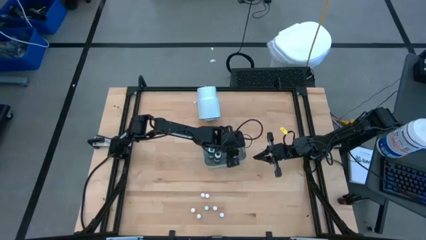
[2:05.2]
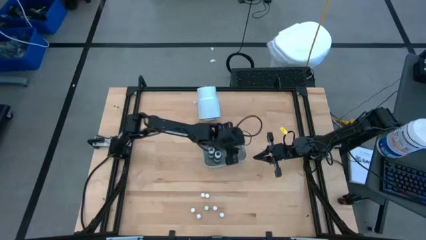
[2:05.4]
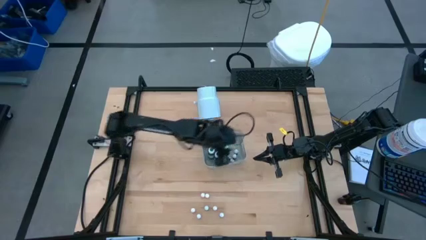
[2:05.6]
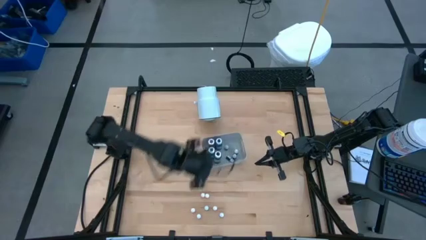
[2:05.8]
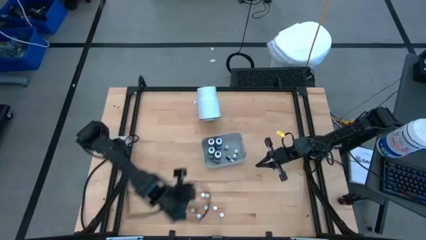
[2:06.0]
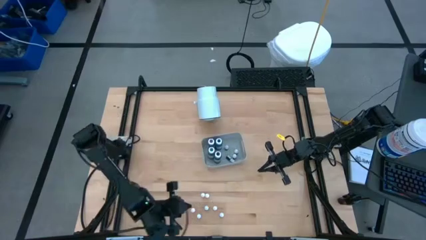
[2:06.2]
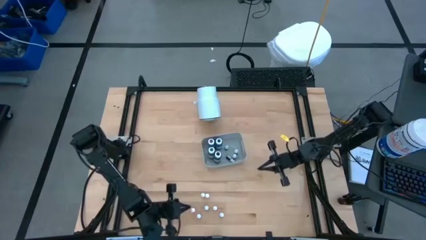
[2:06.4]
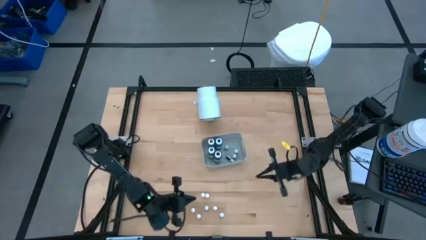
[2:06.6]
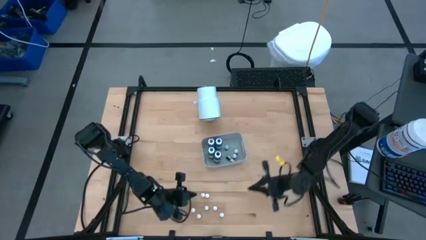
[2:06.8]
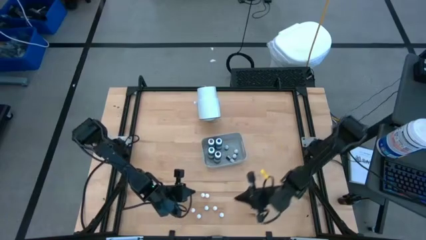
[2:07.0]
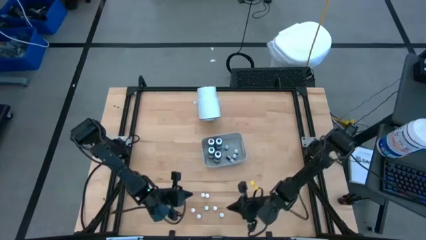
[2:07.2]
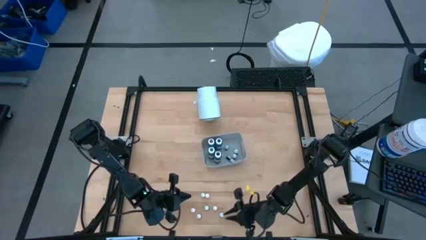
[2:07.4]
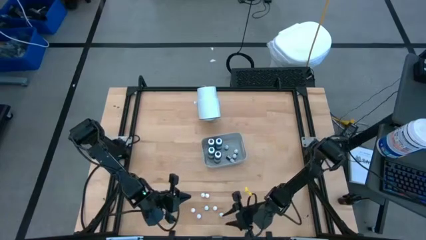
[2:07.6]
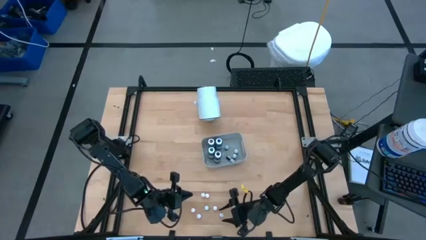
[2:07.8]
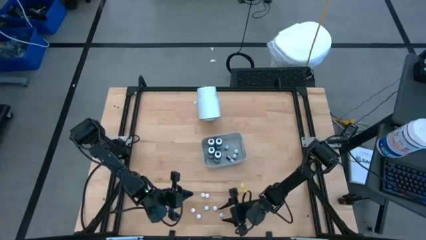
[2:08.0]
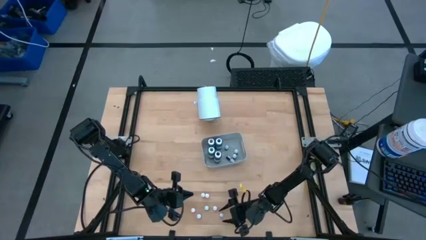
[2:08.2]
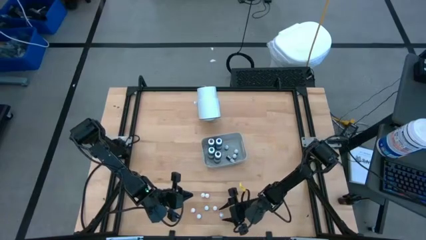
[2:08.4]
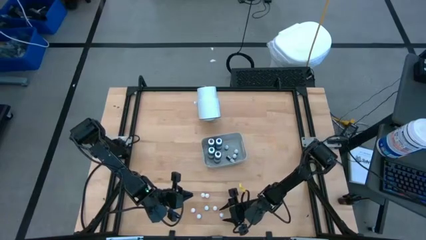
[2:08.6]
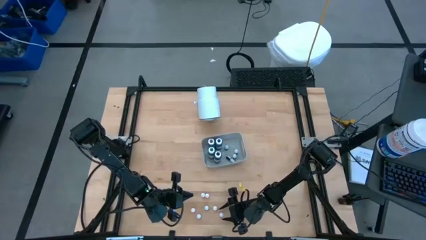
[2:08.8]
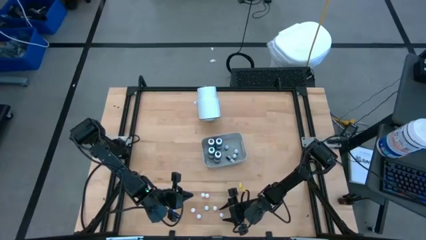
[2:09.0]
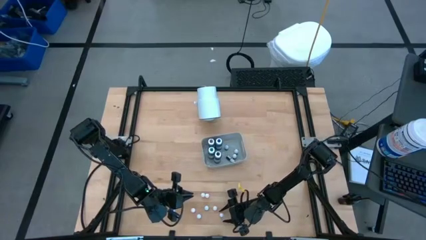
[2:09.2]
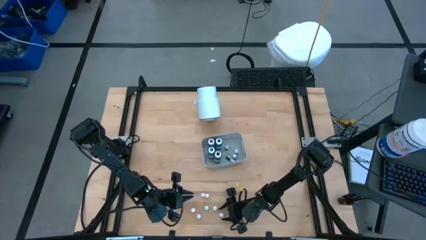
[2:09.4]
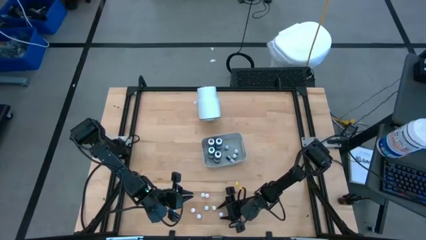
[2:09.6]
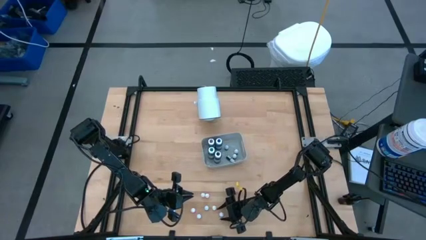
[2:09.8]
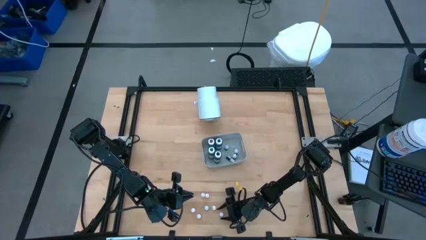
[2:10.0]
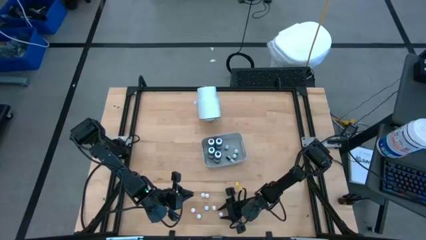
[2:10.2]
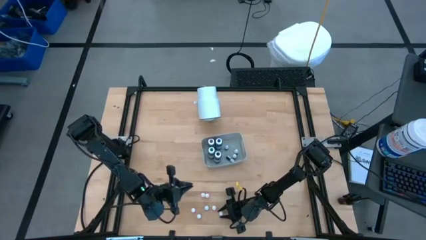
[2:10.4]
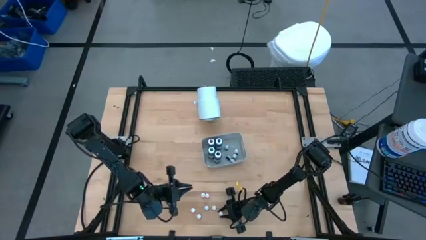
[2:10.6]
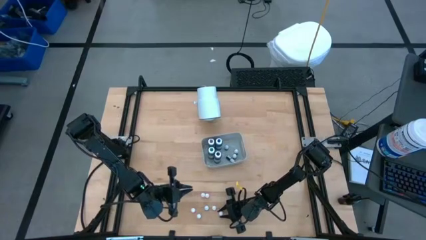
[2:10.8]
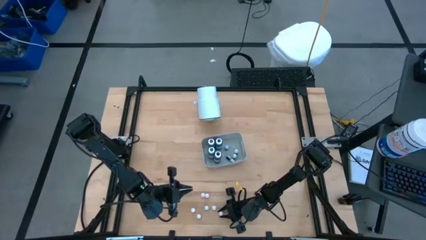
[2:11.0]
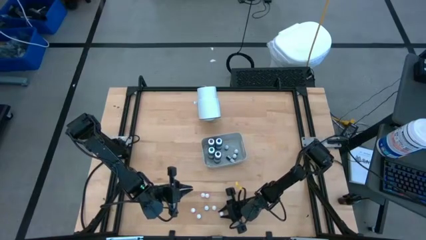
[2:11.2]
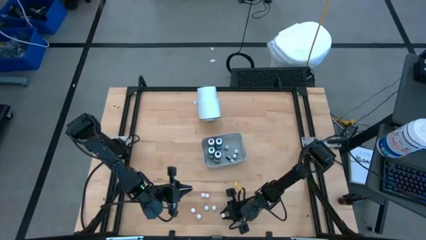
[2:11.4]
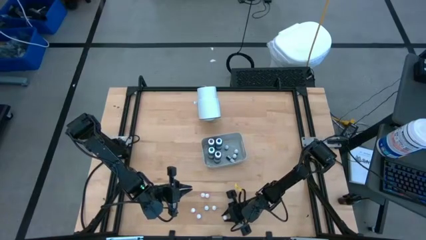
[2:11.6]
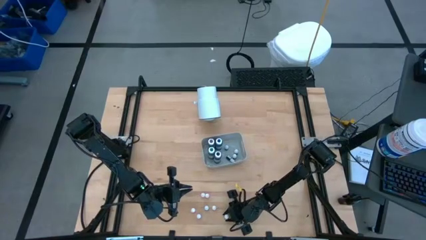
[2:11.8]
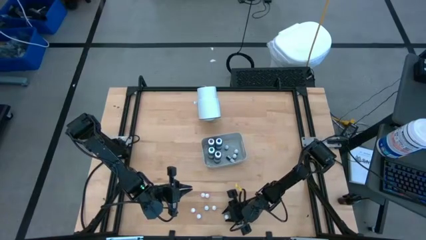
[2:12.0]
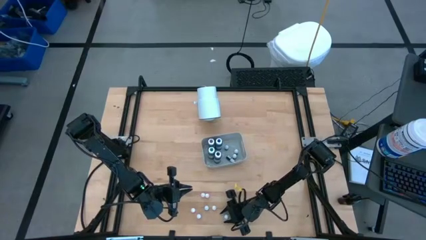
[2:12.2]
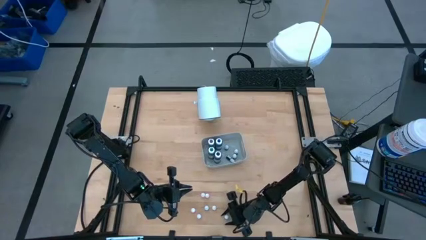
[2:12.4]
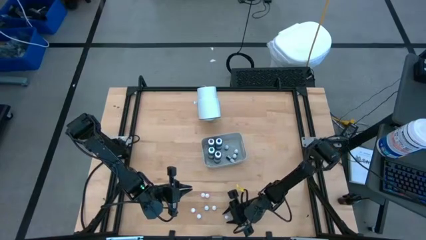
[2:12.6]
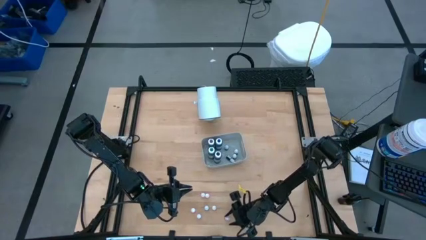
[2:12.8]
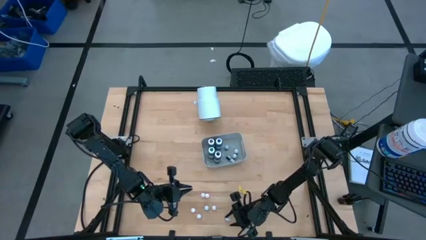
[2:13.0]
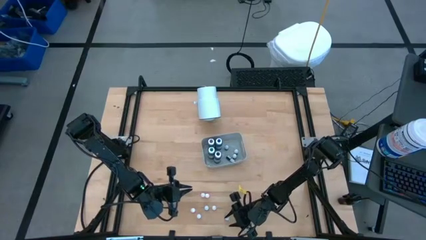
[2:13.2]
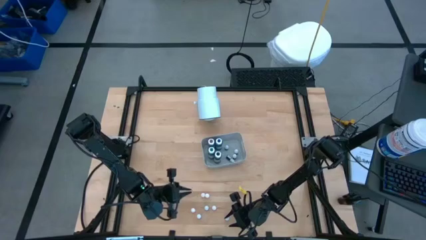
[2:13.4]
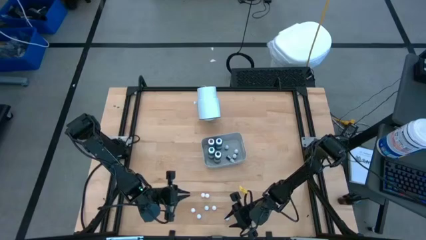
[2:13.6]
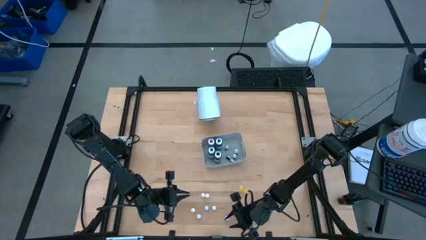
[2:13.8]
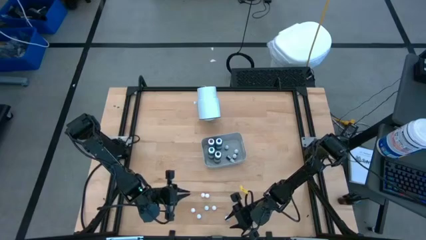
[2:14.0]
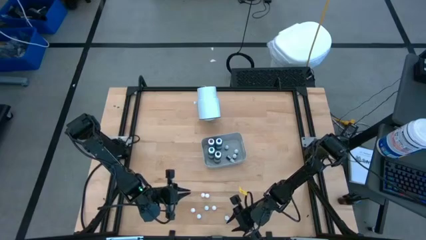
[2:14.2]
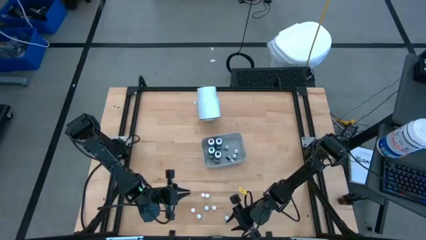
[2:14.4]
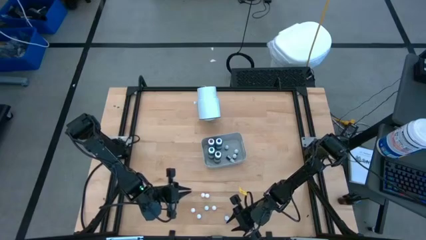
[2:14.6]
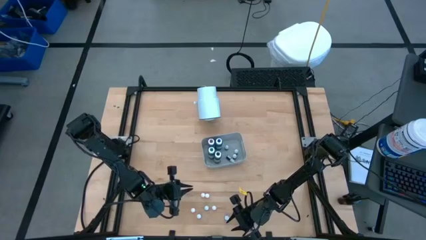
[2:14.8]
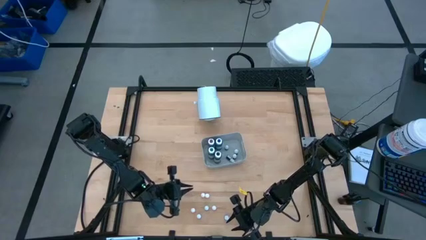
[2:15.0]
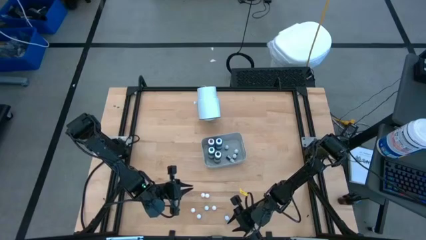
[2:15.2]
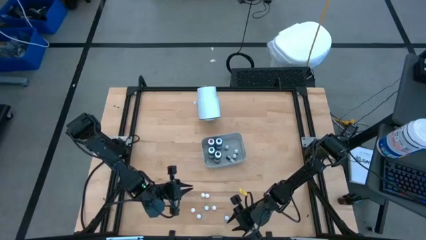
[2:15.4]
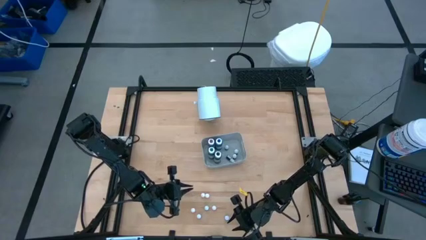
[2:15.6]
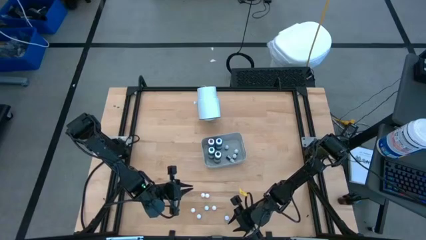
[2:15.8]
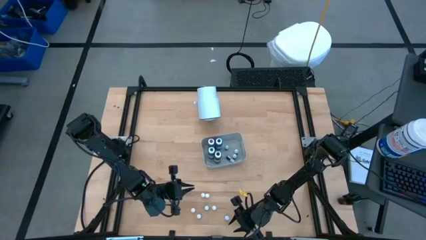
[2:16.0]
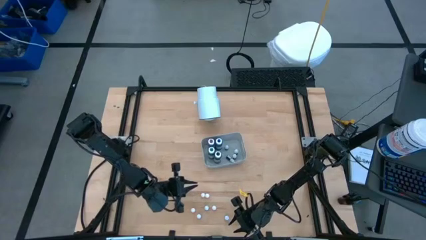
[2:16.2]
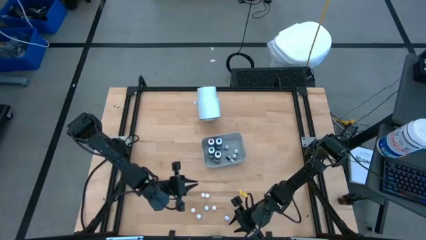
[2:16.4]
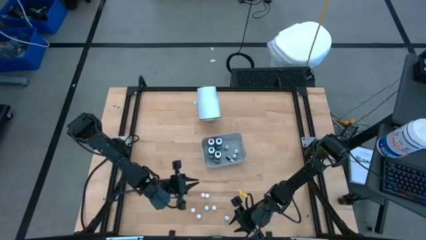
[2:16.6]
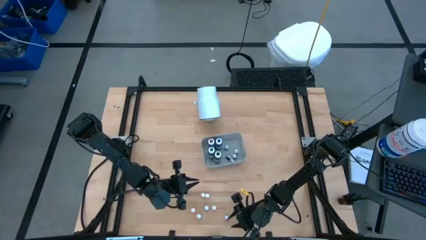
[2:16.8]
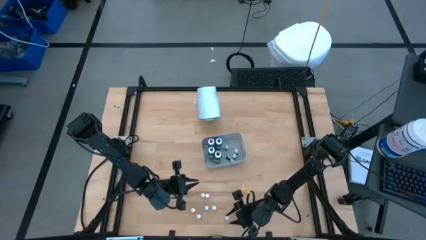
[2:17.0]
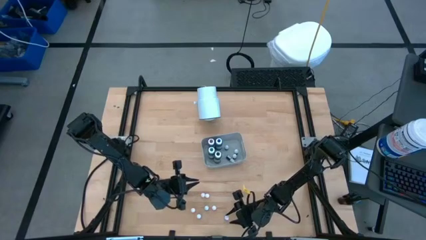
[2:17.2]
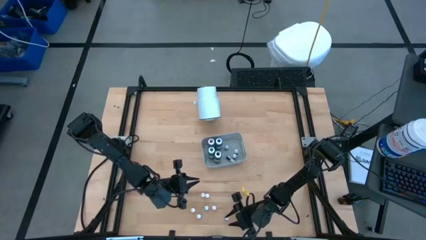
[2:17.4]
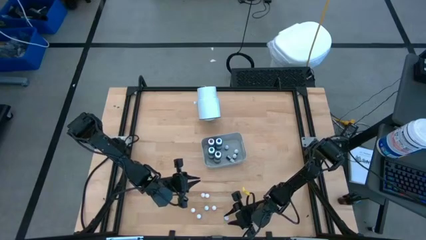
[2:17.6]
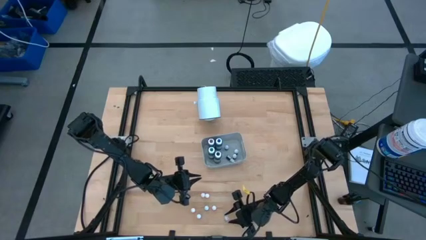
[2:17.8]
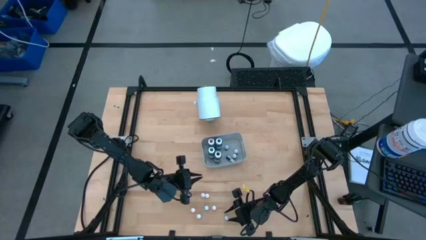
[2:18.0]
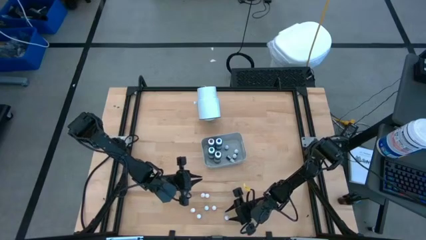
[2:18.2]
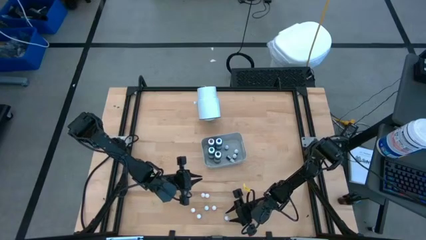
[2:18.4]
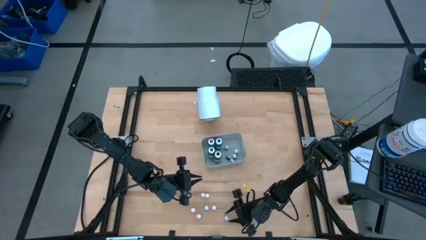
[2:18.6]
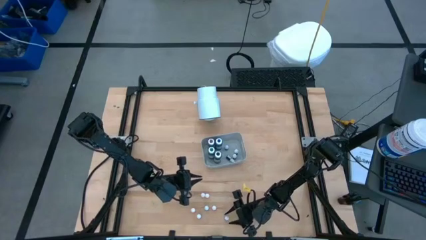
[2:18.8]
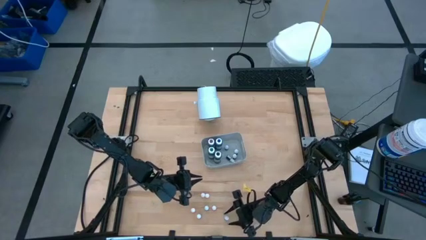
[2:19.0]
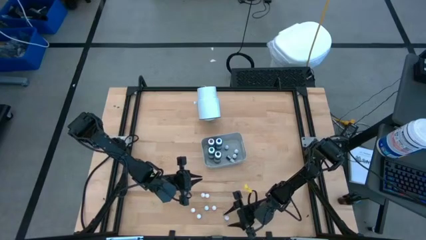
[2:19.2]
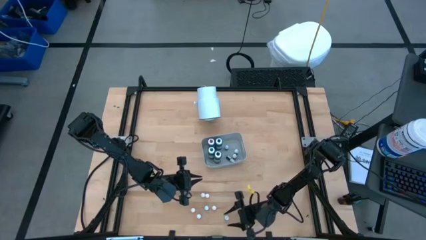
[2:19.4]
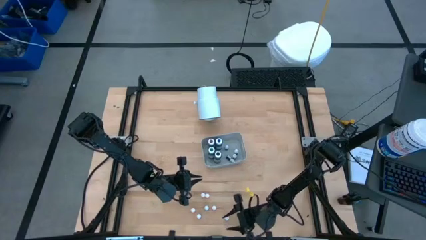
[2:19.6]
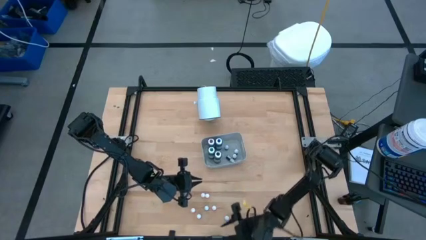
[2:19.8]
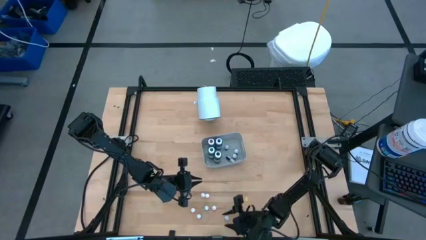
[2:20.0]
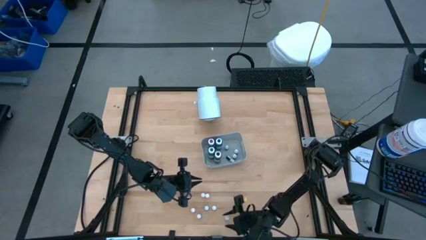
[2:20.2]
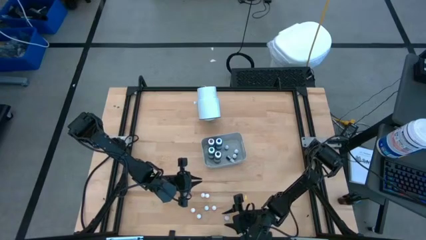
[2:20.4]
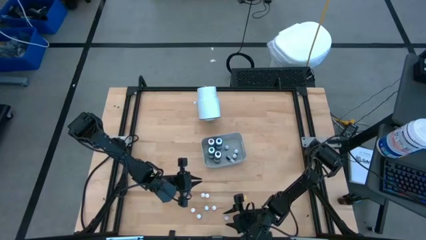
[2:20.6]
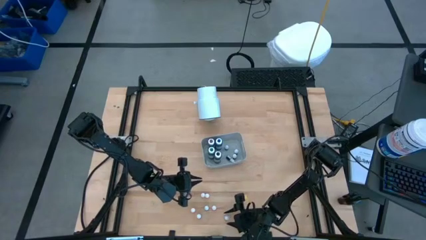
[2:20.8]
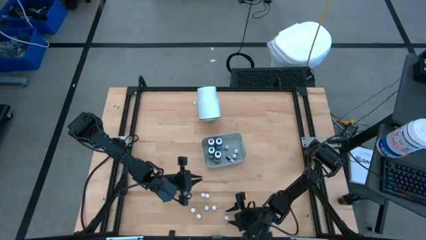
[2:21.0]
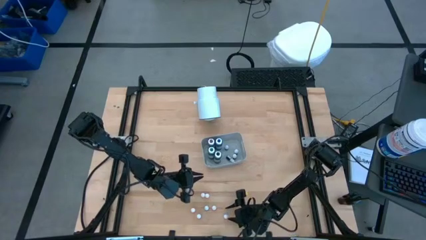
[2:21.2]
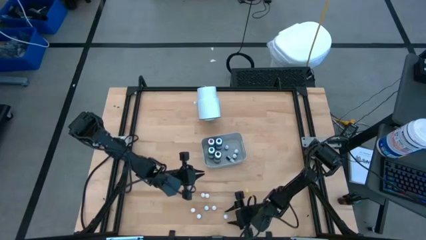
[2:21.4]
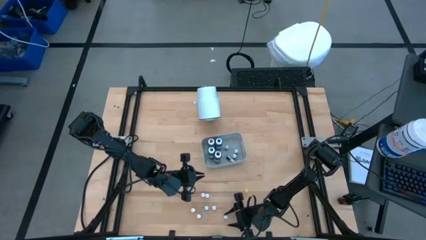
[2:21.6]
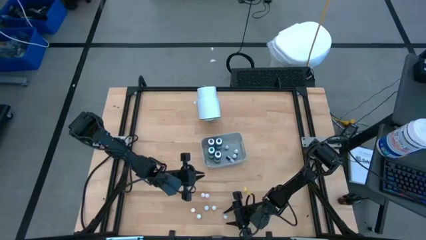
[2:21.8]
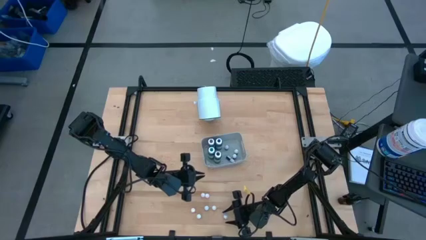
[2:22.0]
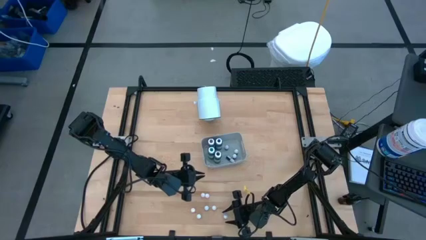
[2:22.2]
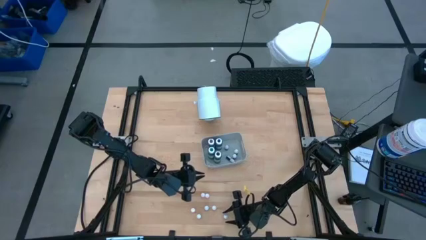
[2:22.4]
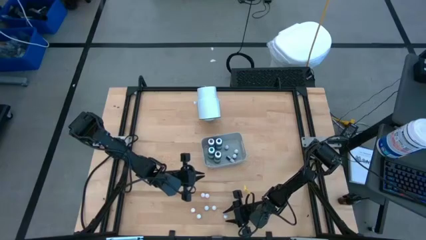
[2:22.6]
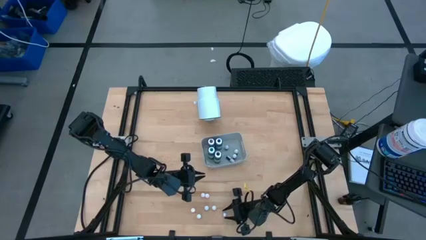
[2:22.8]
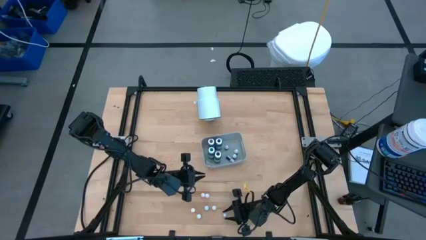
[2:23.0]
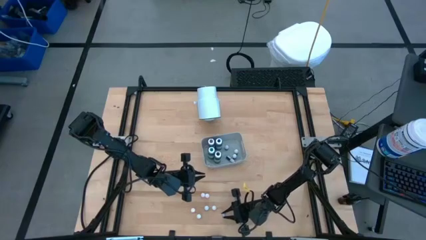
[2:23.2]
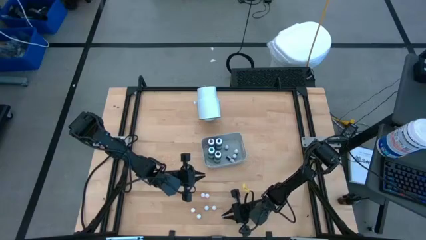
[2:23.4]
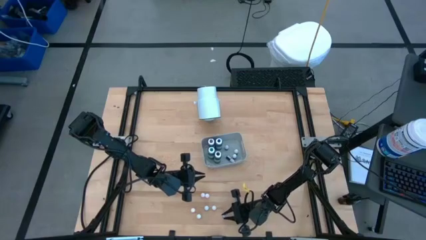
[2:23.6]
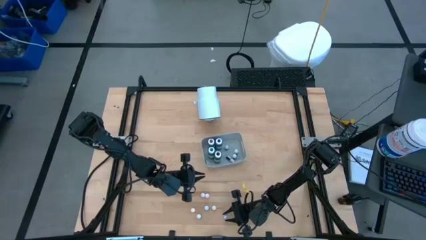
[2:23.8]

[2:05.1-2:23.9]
Task: Pick & Place food coloring
Put the purple food coloring bottle into the gray bin
